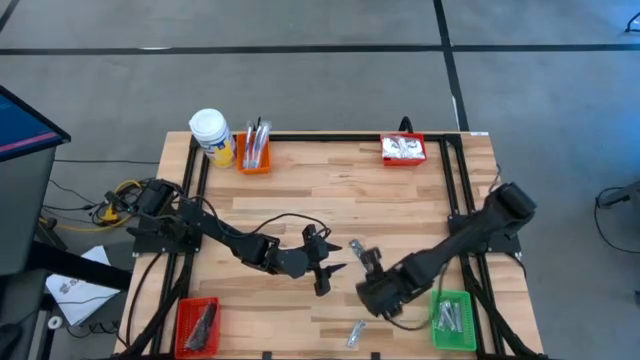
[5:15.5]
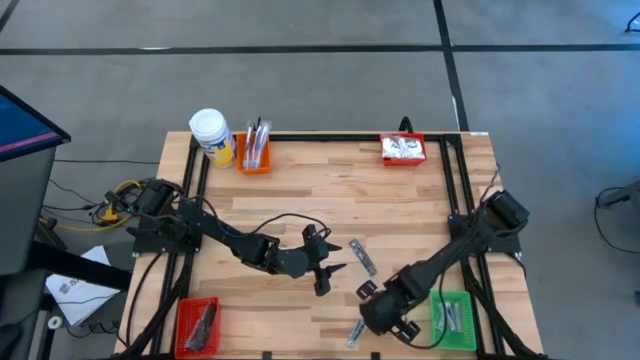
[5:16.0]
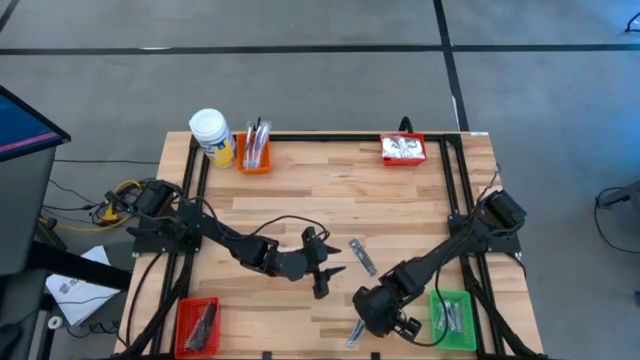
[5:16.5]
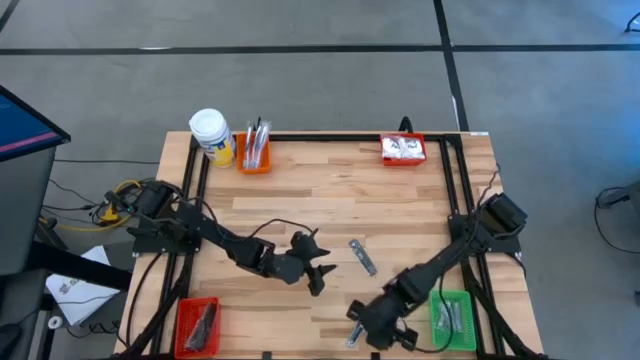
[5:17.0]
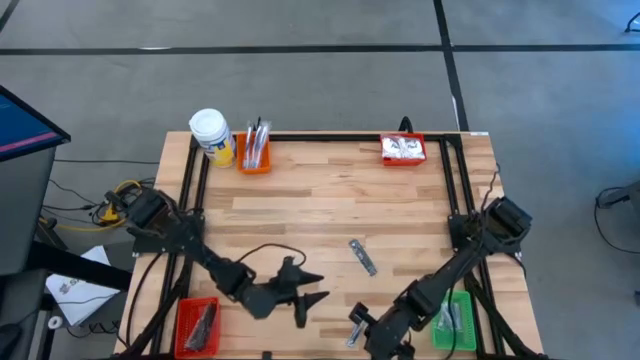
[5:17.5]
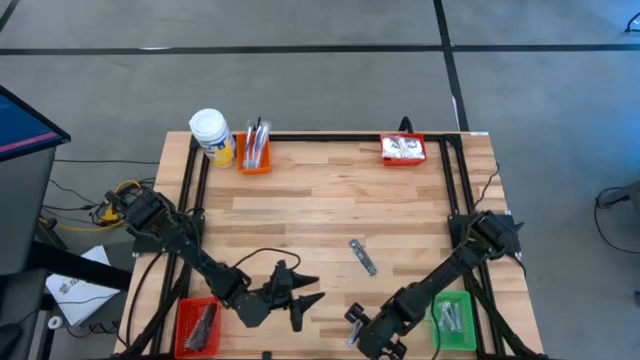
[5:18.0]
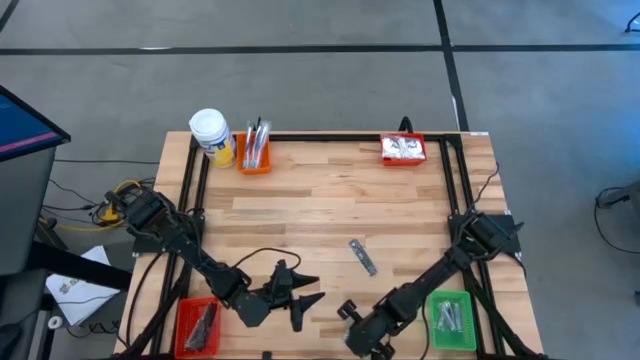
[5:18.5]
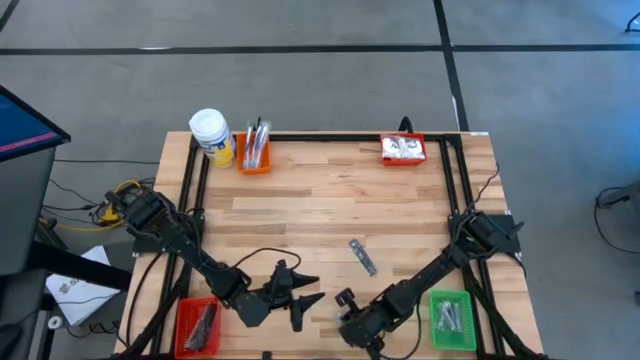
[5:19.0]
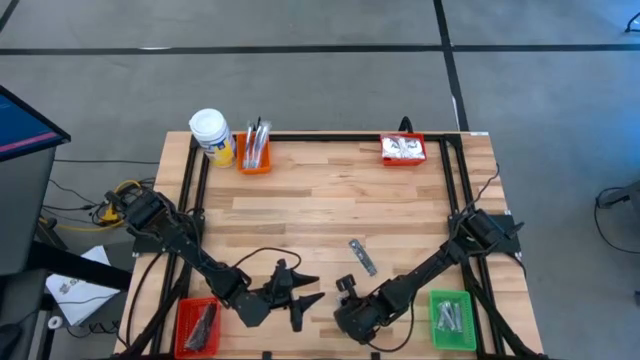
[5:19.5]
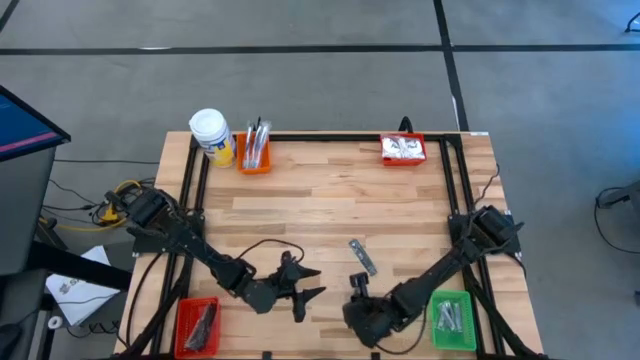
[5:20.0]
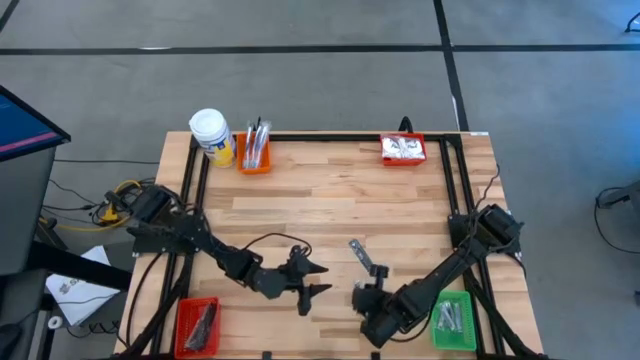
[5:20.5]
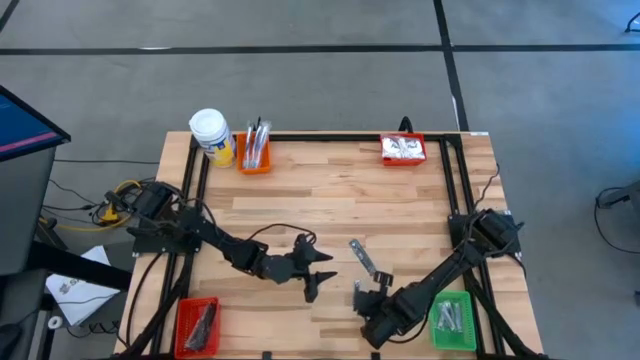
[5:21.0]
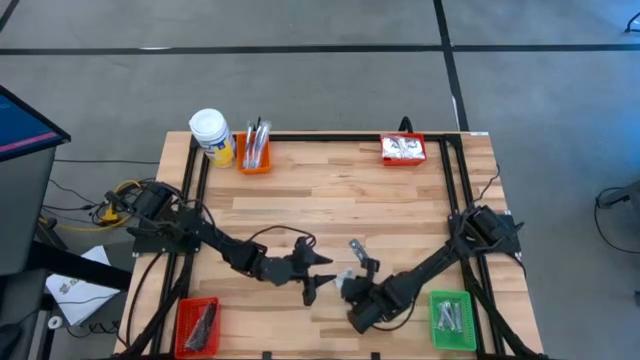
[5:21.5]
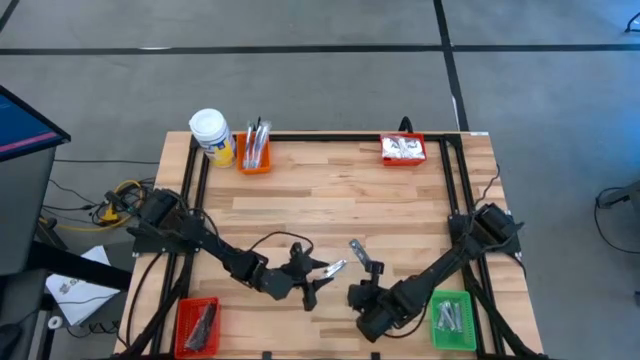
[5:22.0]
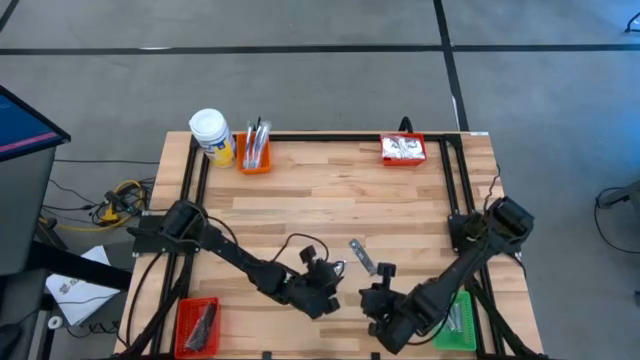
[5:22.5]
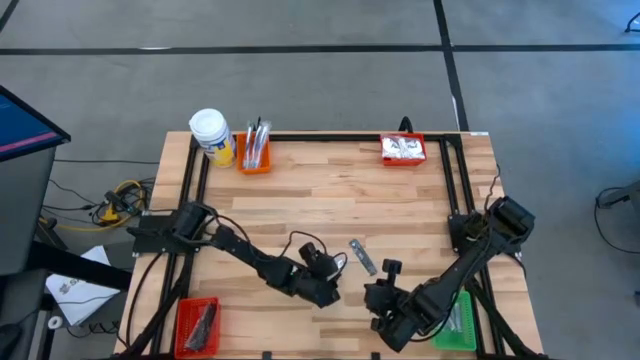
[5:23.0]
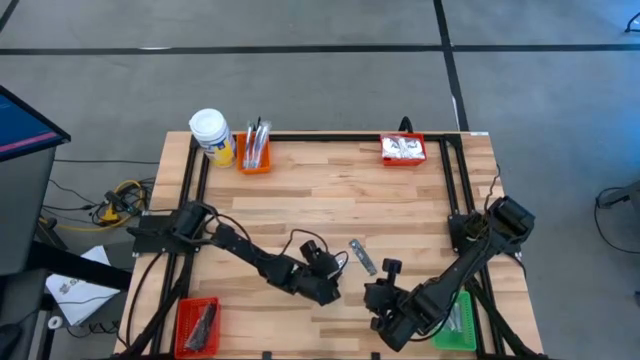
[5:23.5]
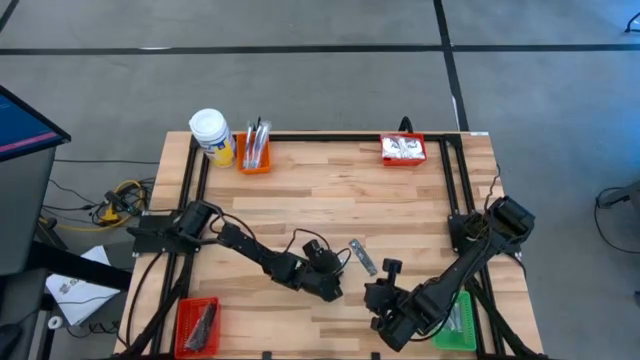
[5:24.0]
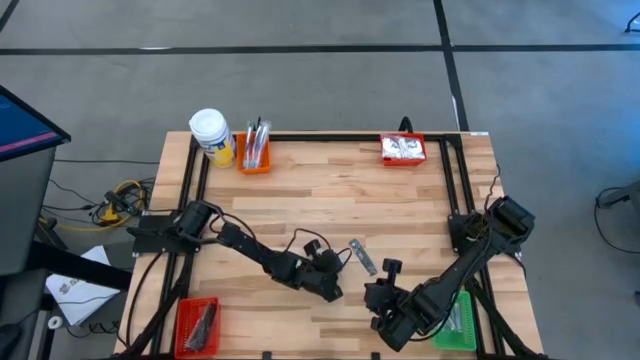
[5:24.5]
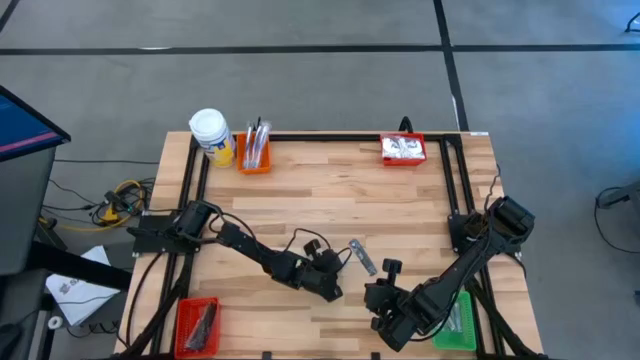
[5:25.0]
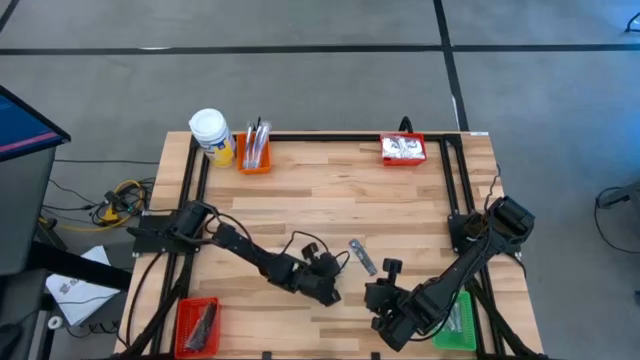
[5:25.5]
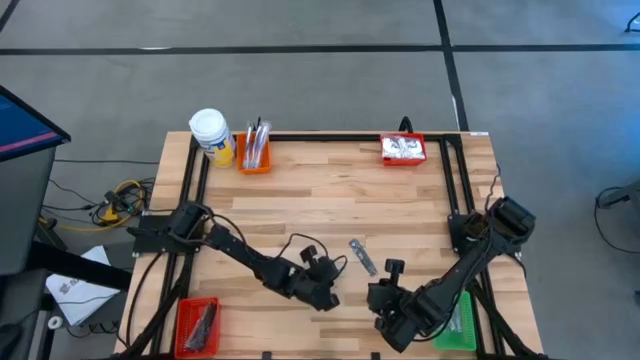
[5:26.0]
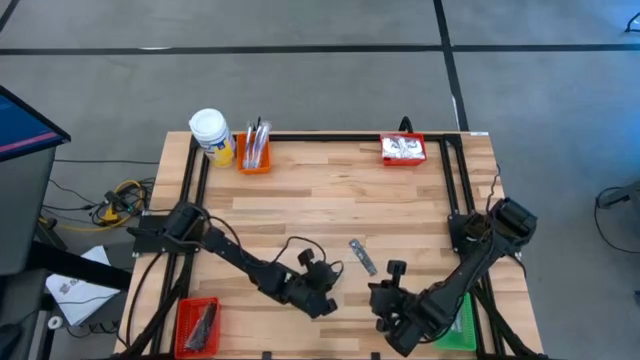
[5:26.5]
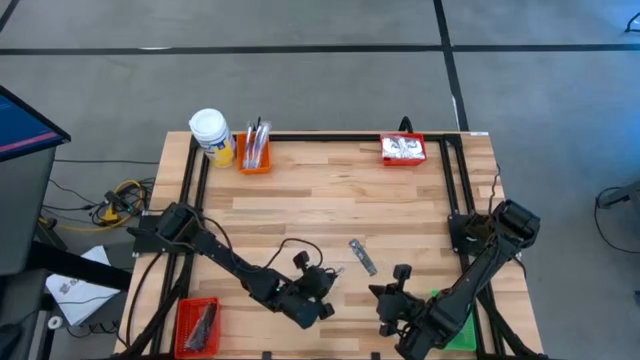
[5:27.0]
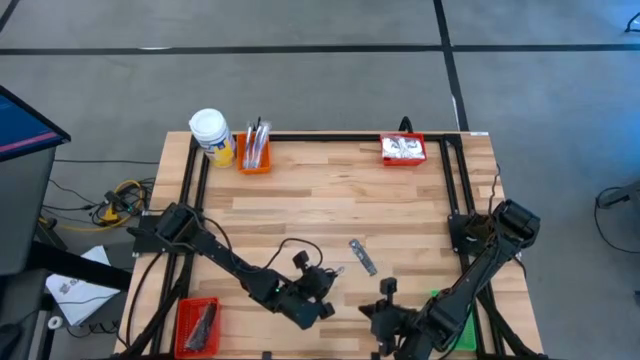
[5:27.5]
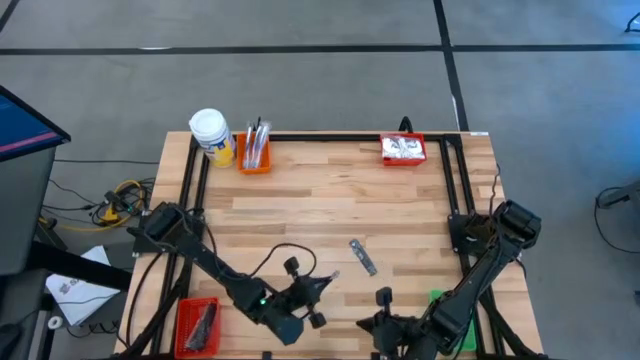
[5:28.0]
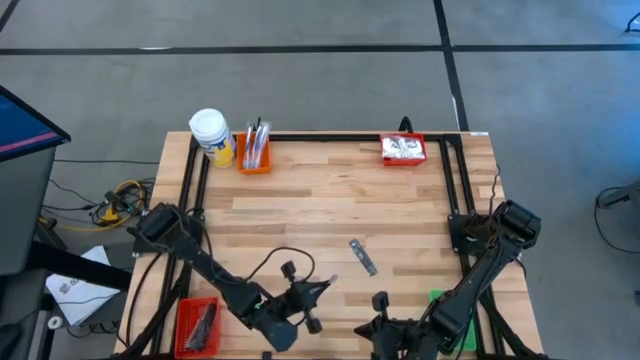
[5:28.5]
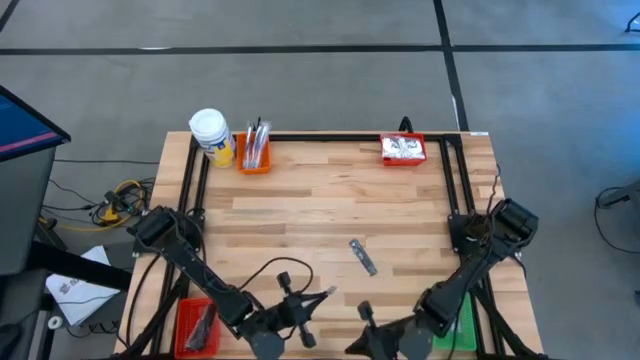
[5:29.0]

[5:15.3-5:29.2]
Task: Pick & Place Travel size toiletries
Put the nail cutter into the green bin

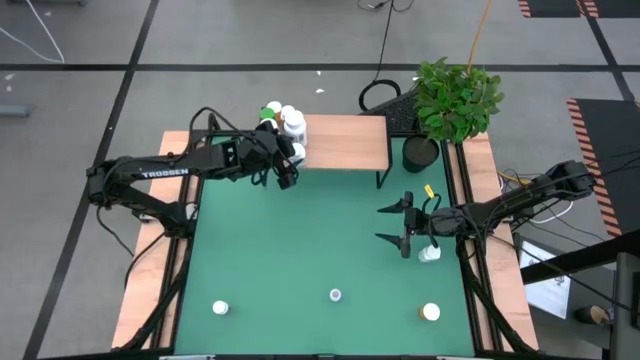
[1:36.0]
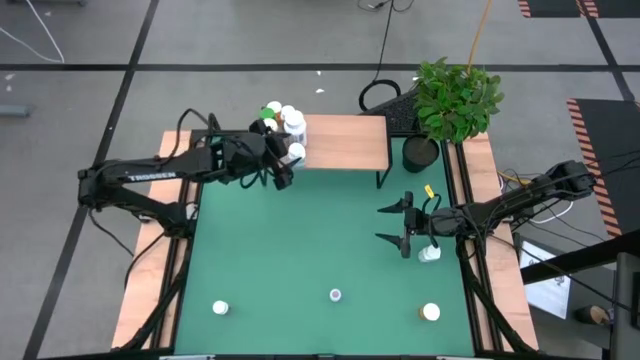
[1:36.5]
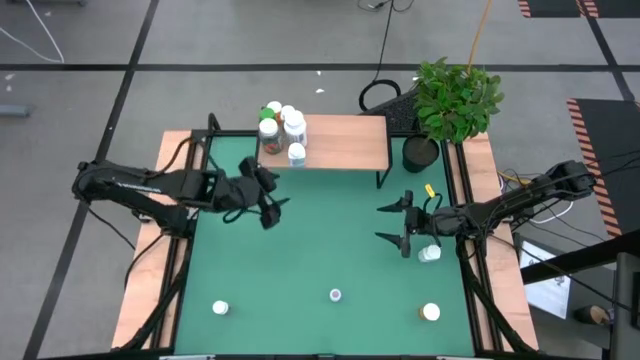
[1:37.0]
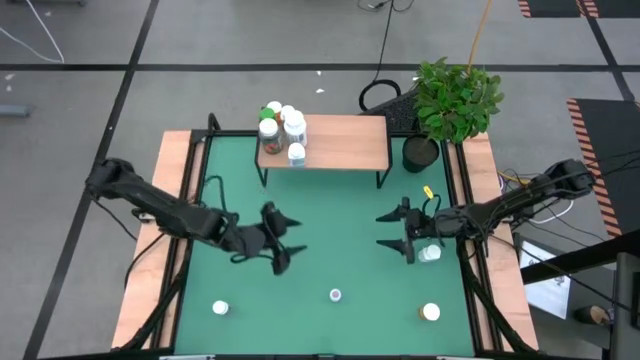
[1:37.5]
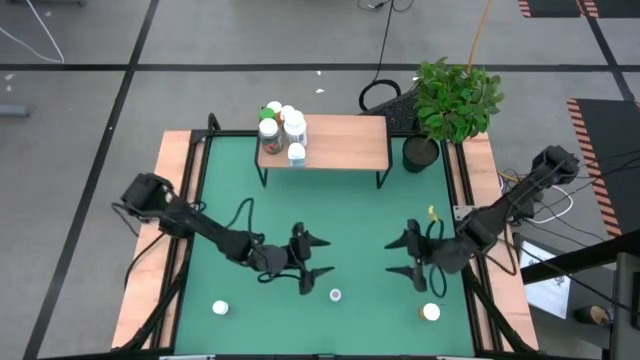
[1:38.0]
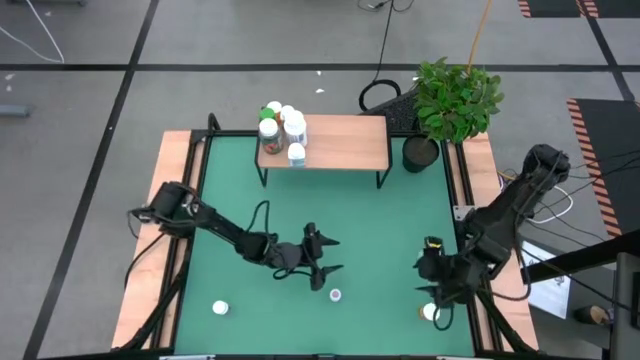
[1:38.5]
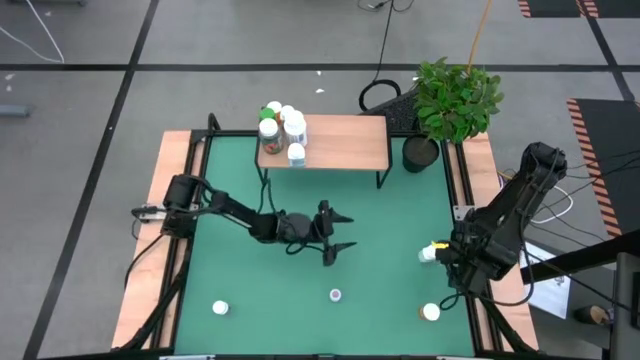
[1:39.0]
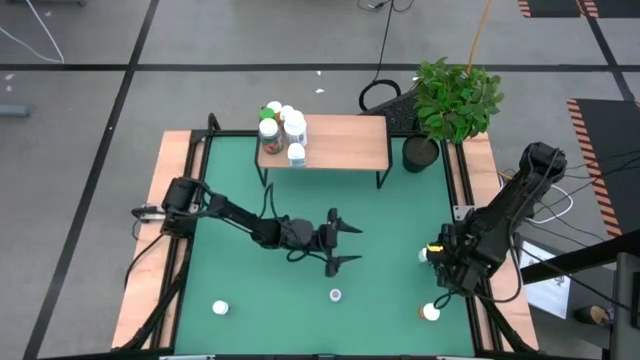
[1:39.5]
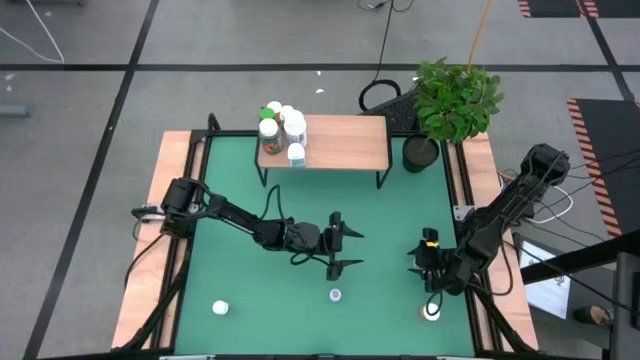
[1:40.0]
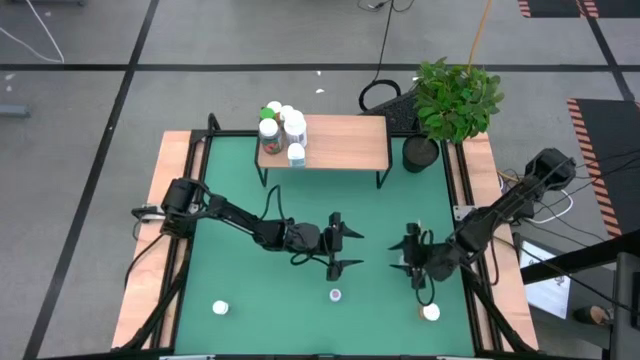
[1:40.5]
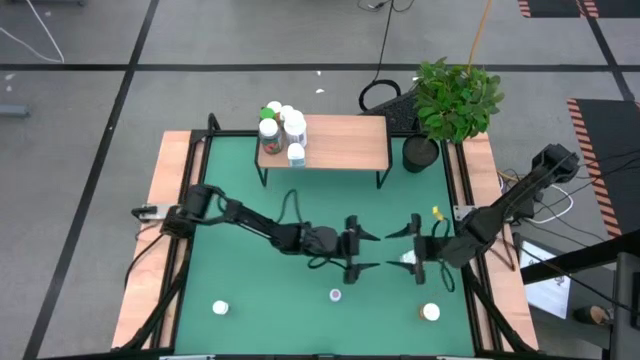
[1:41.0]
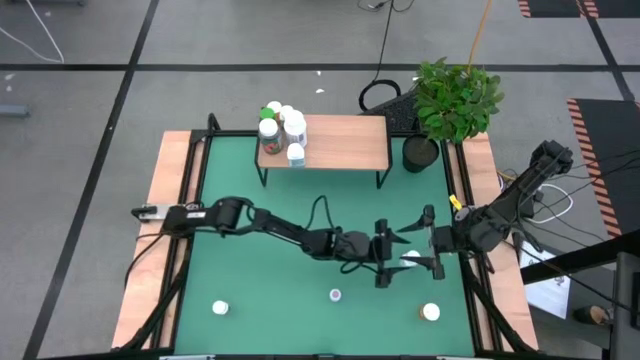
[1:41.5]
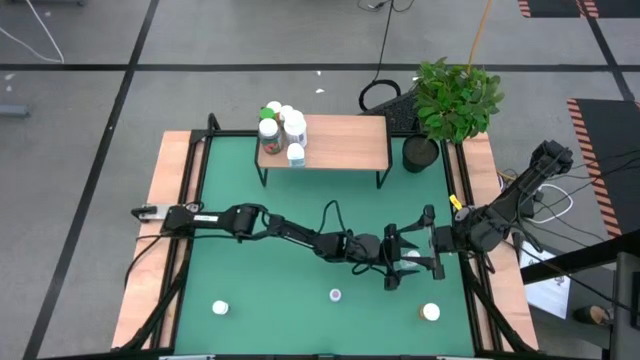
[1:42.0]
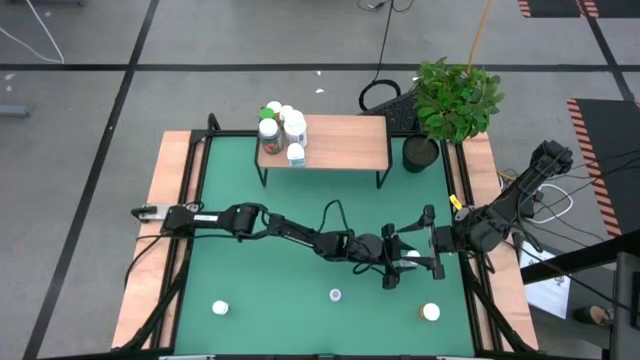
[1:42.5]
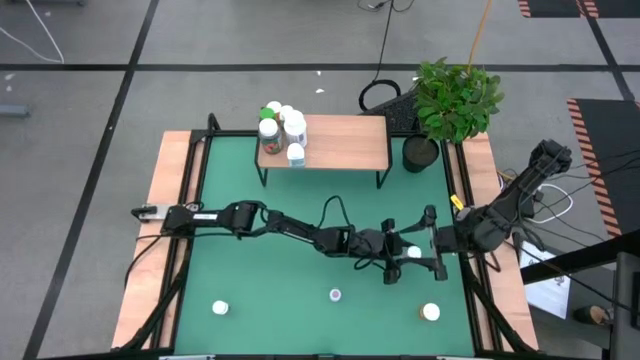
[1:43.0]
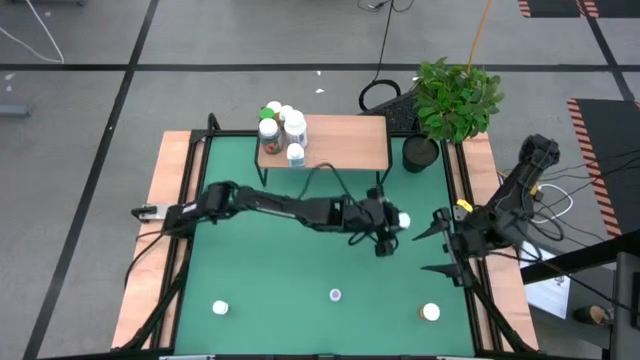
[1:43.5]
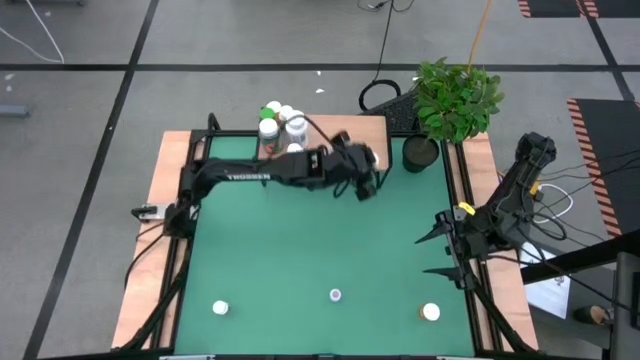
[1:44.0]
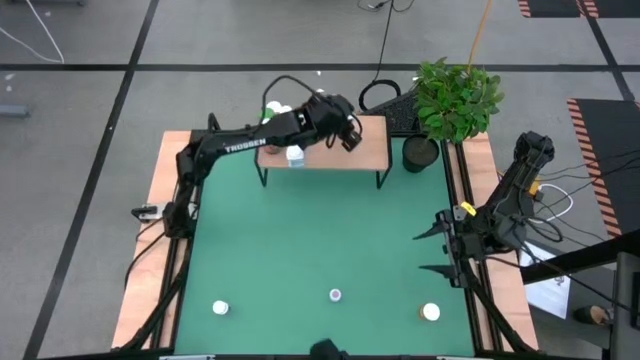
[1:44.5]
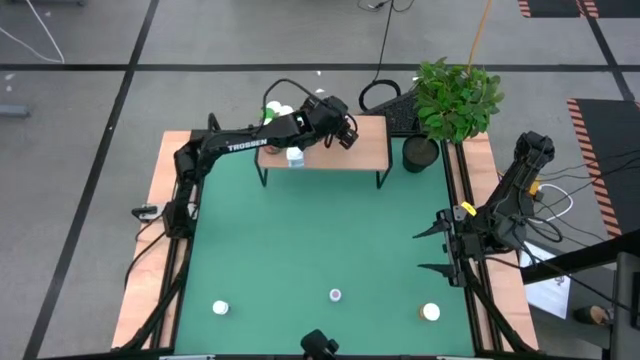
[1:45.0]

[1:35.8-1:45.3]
Task: Pick and place medicine bottles onto shelf by color
Put the blue bottle on the shelf
